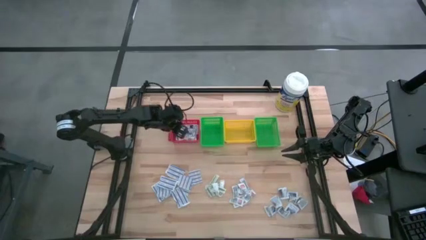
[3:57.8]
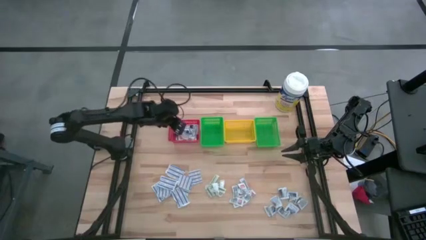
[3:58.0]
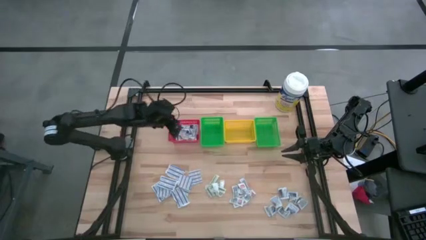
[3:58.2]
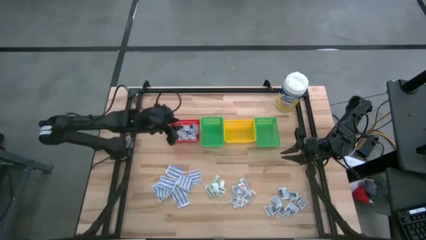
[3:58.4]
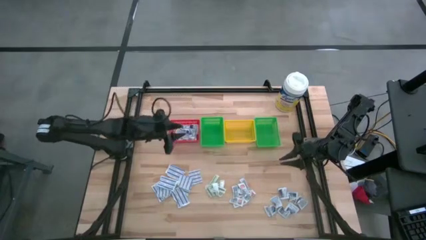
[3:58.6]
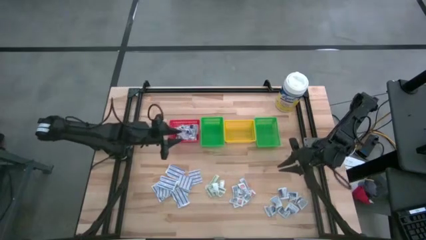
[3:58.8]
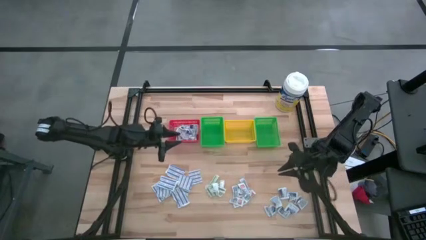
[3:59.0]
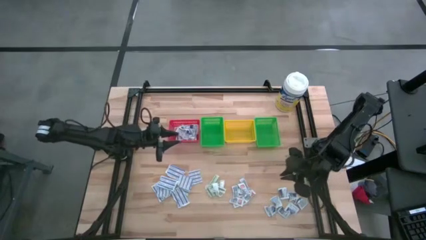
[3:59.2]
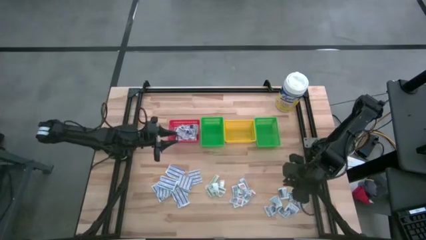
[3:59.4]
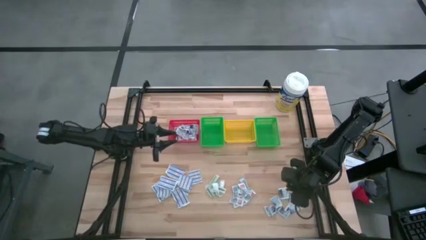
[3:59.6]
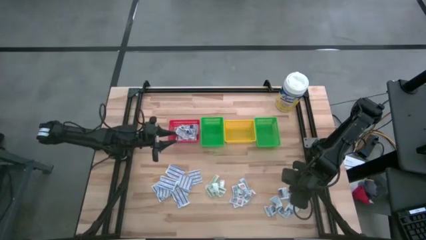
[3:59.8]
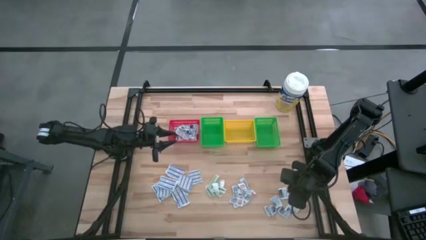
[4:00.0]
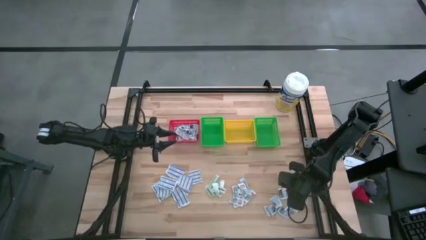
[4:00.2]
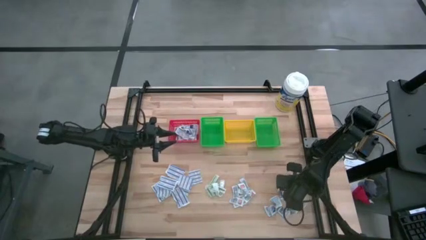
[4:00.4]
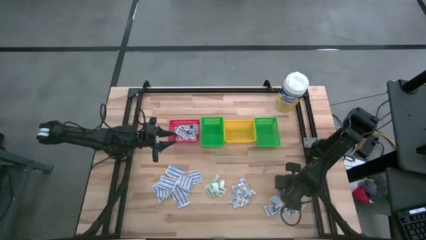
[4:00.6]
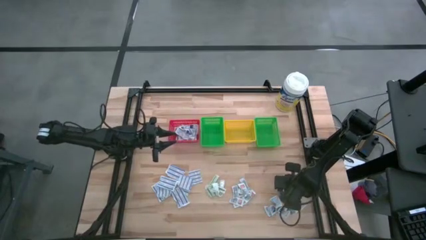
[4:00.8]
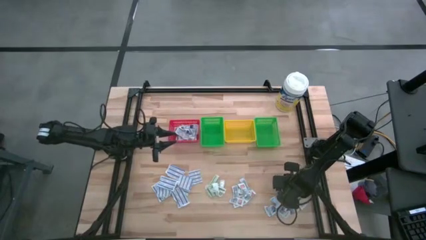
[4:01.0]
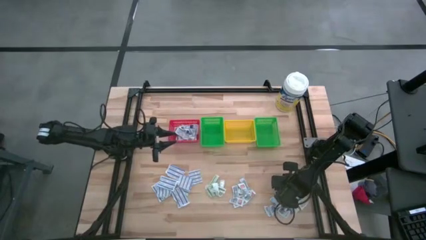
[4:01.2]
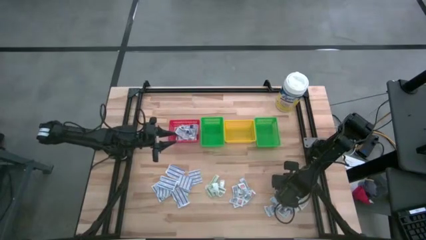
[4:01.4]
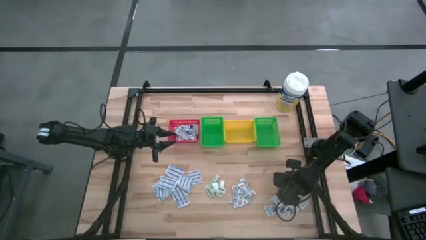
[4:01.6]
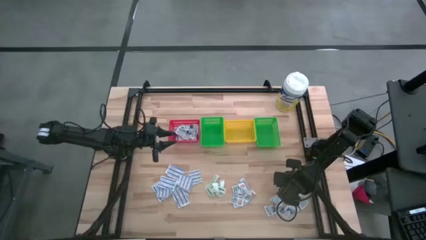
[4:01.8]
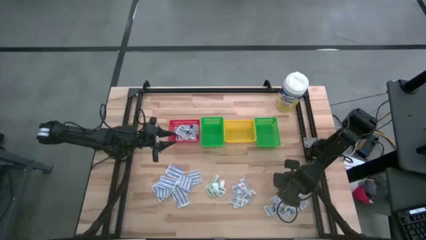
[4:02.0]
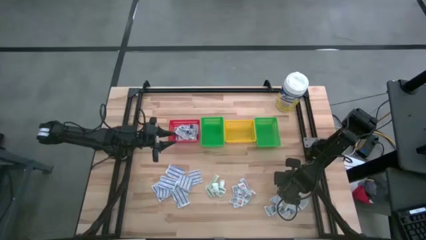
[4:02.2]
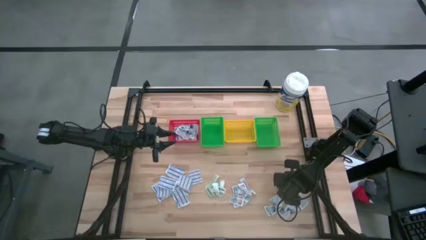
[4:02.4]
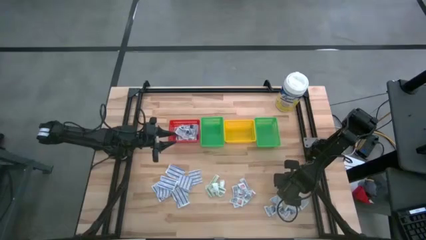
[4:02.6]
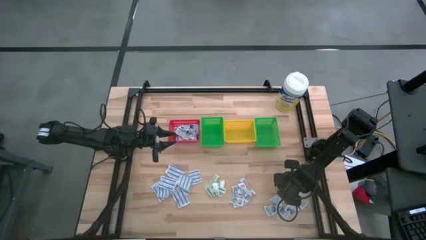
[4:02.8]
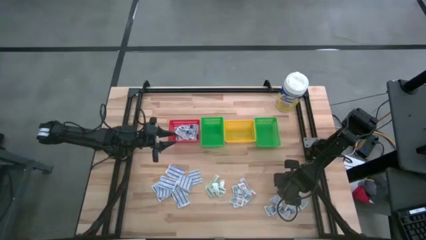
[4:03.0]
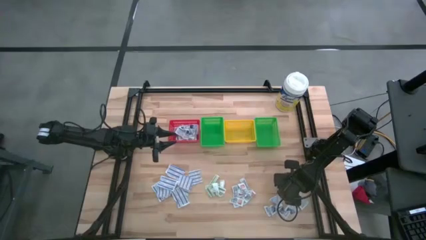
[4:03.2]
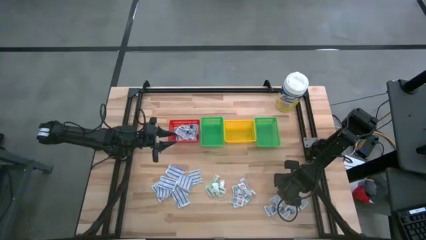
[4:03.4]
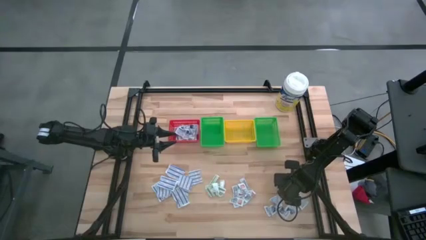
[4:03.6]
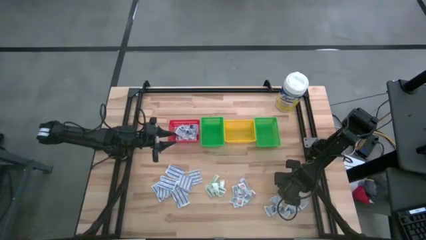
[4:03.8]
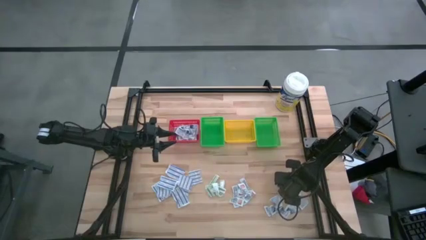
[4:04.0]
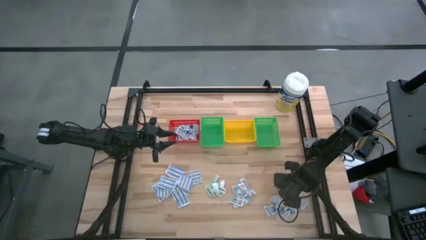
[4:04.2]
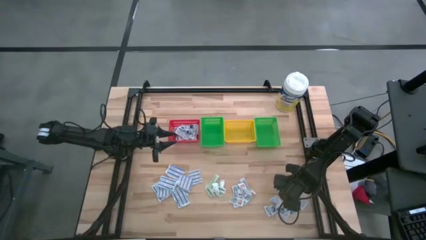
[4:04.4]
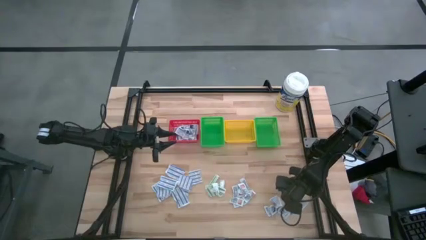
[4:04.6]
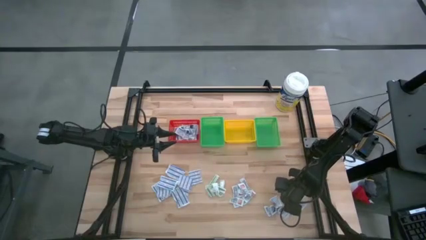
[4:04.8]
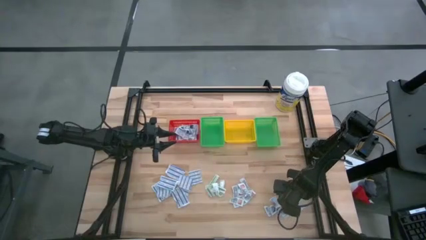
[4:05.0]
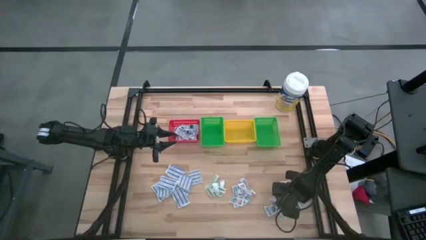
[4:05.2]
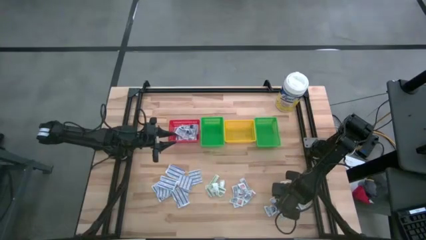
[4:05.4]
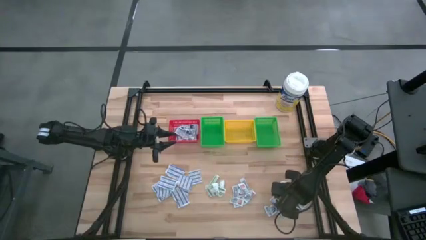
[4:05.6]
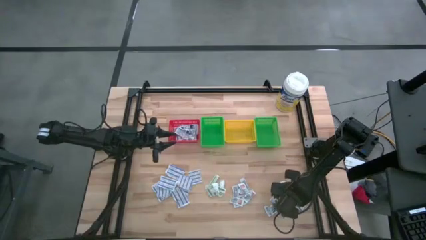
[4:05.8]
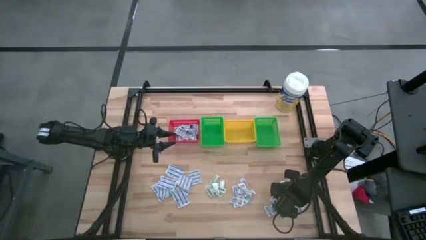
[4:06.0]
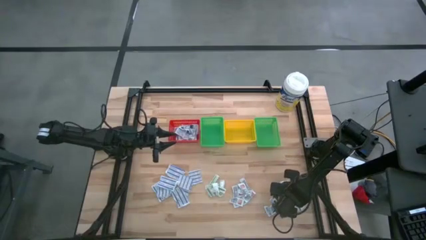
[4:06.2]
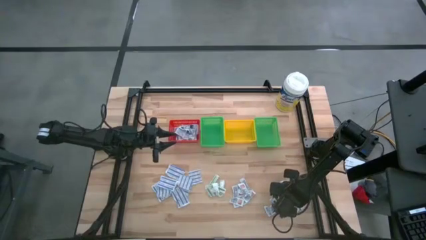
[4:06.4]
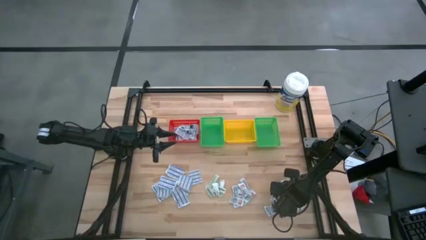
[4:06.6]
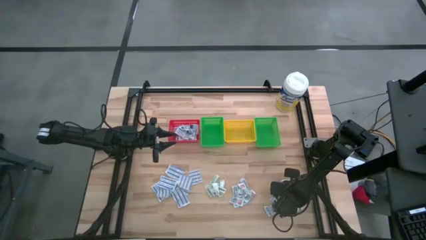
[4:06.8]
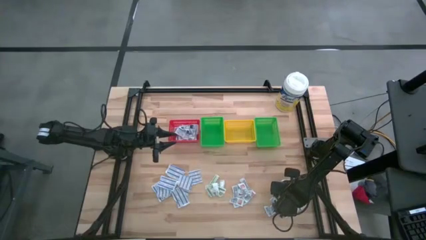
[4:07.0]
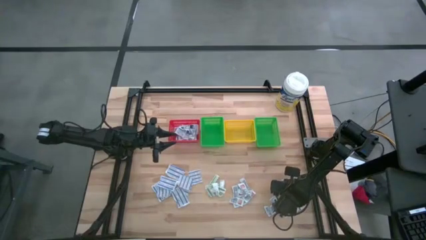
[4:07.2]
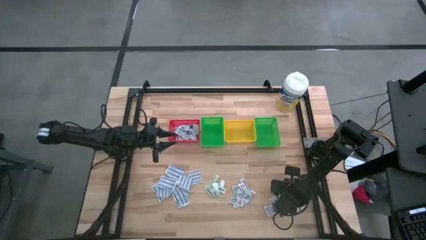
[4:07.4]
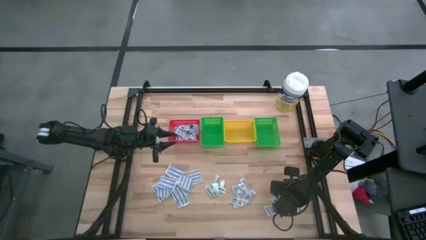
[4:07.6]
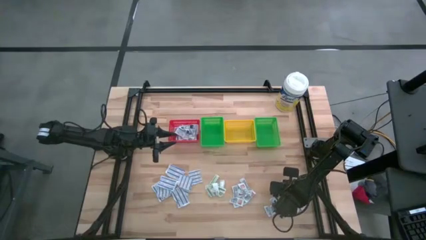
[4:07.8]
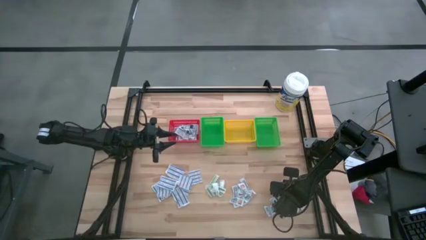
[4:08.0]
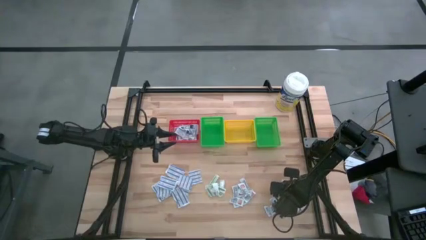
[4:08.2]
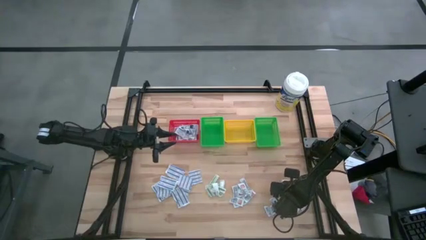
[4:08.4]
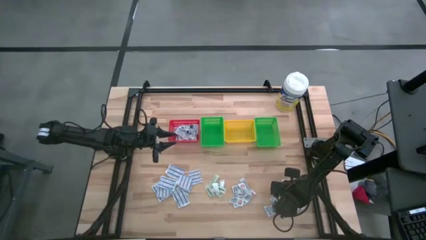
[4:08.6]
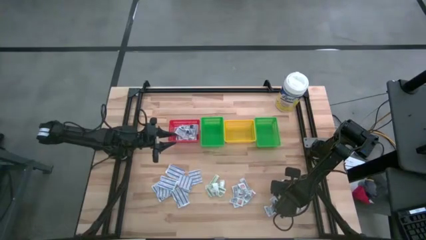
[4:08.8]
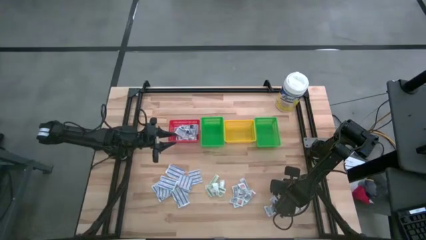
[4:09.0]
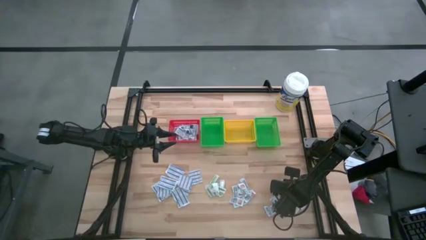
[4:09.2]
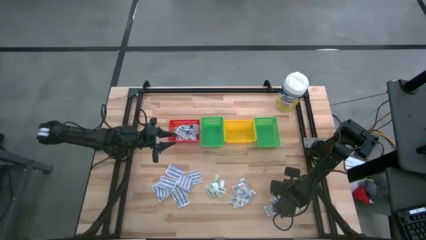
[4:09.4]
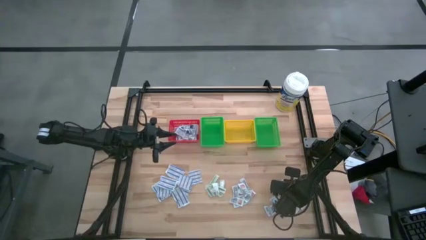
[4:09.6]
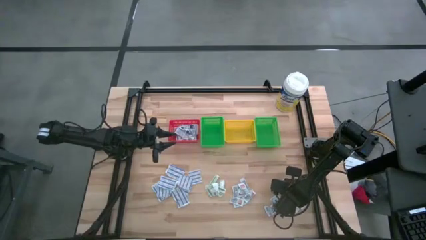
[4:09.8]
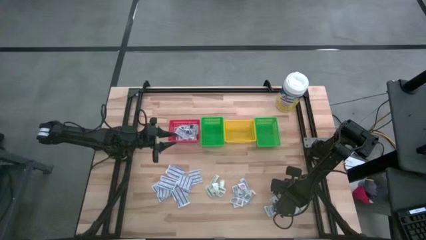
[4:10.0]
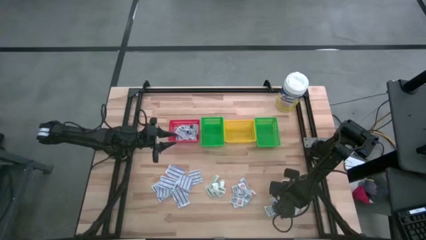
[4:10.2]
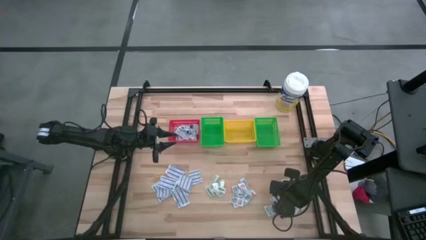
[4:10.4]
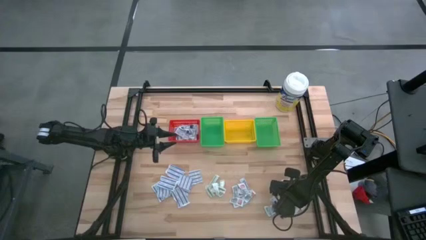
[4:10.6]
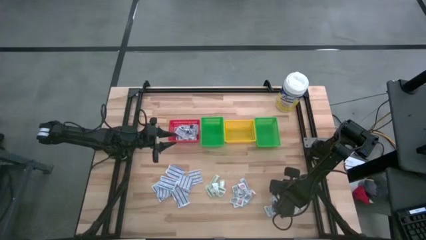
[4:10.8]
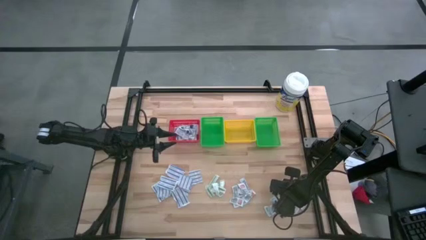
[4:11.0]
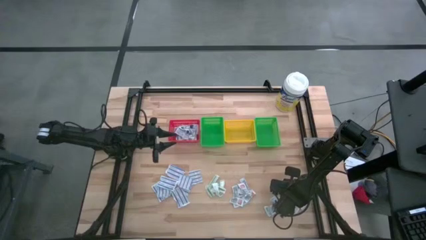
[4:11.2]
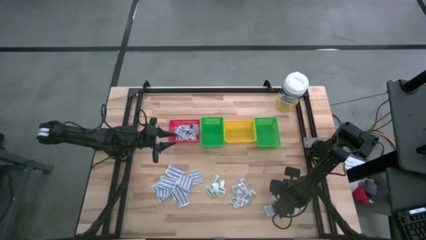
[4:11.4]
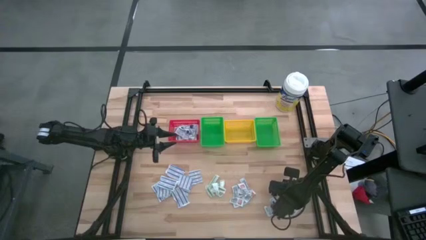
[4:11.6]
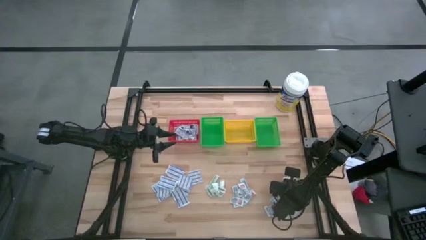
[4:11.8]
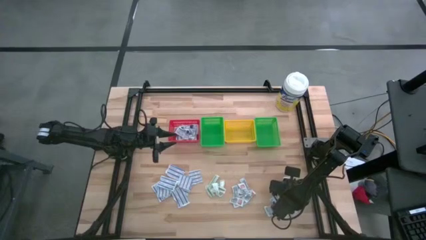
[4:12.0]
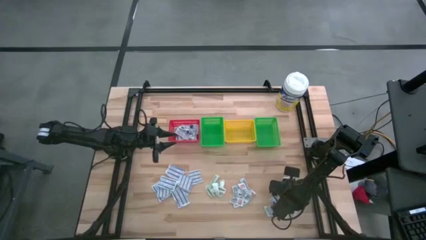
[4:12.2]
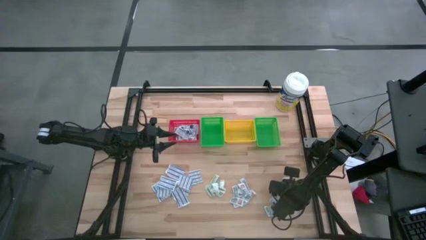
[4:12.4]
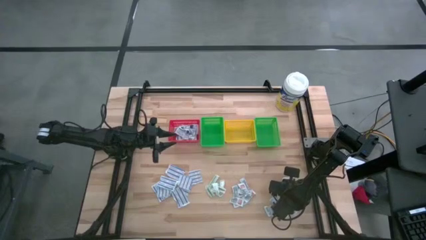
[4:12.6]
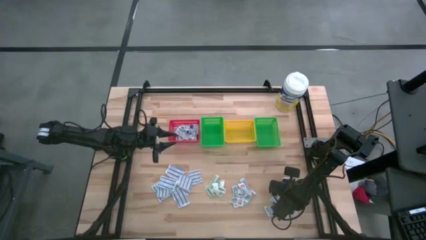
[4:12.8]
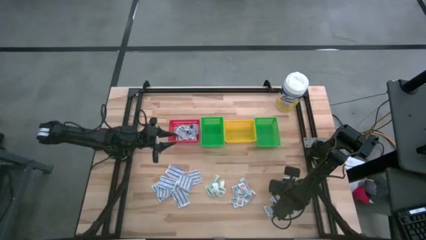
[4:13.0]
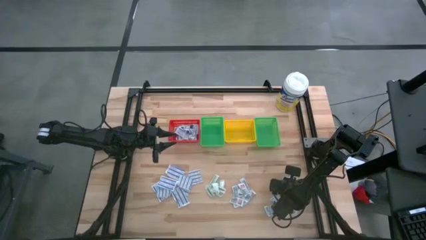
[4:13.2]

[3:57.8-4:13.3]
Task: Pick & Place First Aid Supplies
Put the alcohol pad into the red basket
